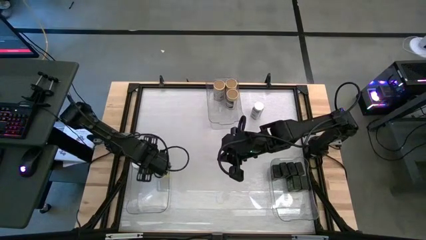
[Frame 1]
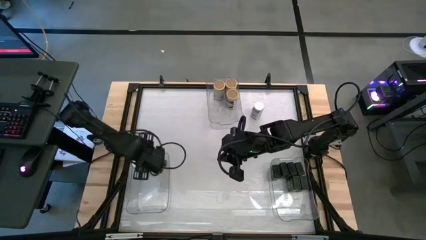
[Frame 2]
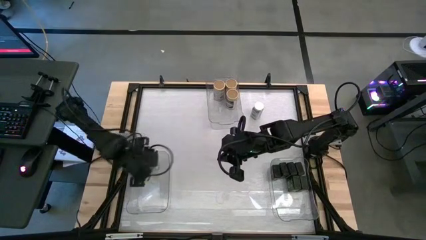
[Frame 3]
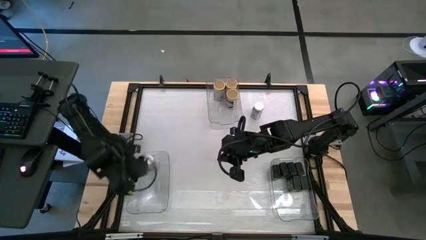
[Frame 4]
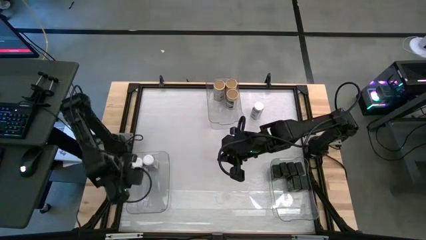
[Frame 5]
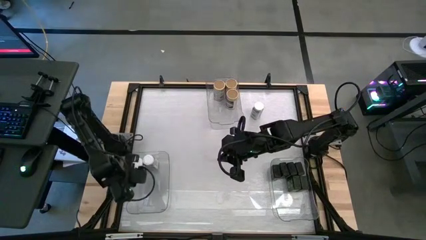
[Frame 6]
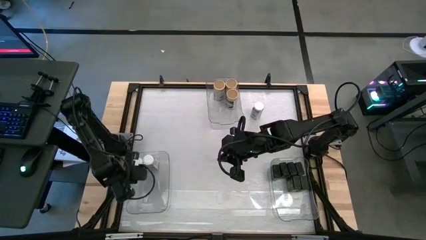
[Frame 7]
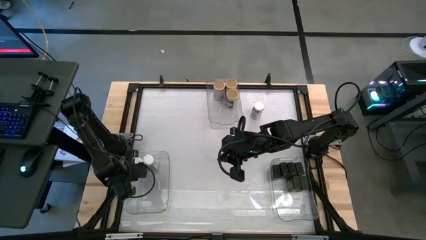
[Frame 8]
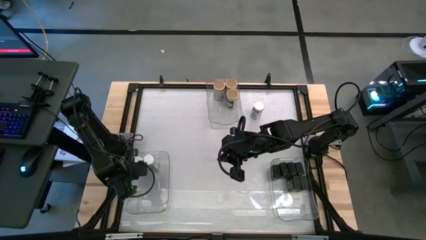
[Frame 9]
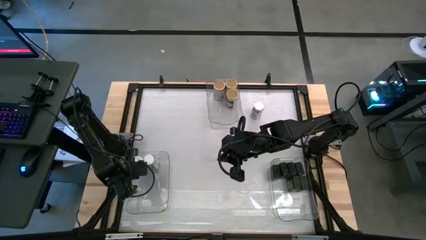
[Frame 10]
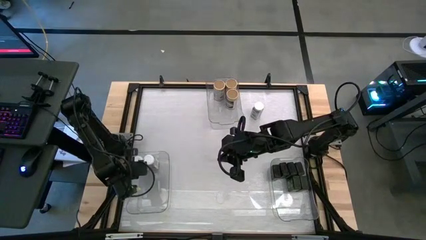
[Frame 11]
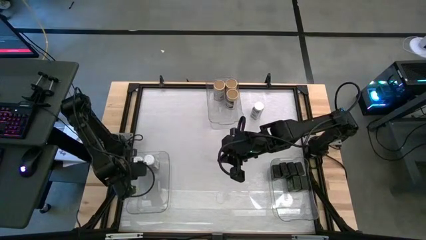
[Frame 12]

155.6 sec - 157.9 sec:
Task: Sort spices by type
Adjust the white spice bottle in the left transparent bin

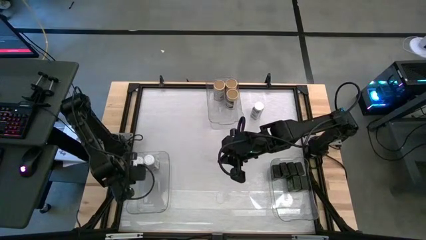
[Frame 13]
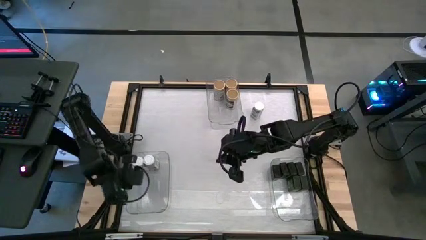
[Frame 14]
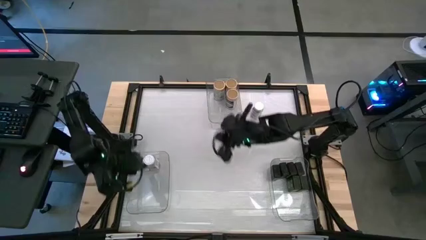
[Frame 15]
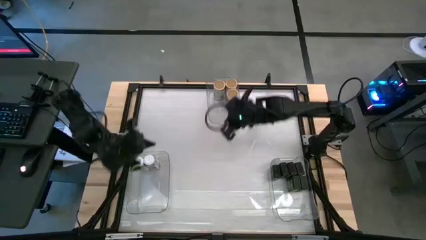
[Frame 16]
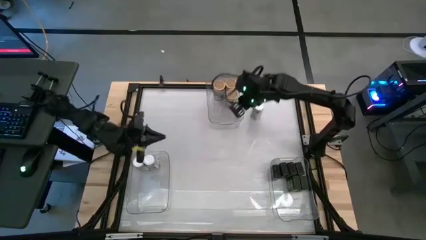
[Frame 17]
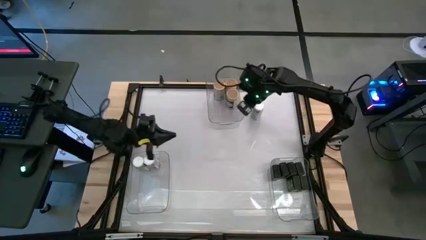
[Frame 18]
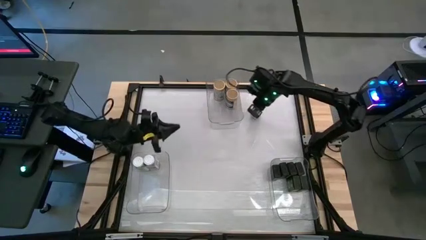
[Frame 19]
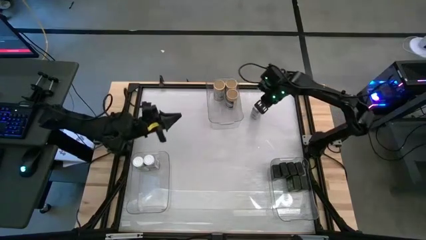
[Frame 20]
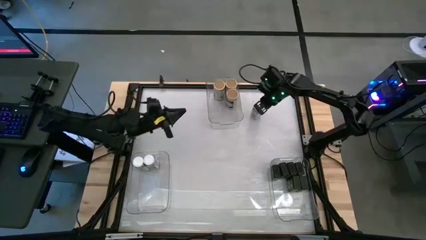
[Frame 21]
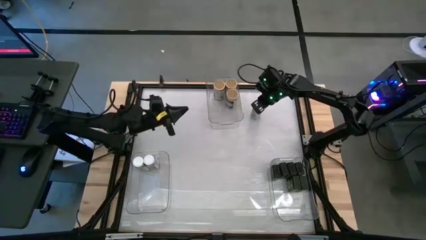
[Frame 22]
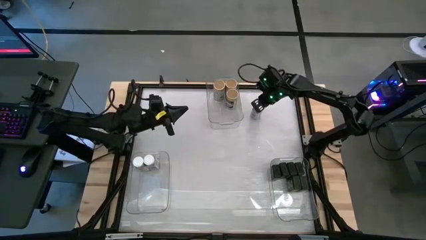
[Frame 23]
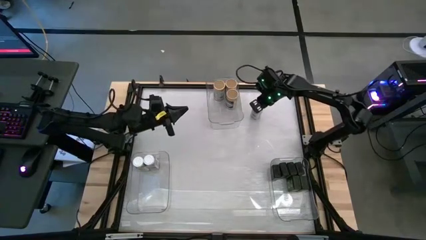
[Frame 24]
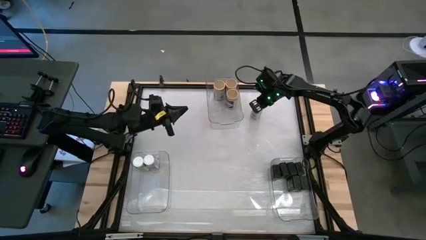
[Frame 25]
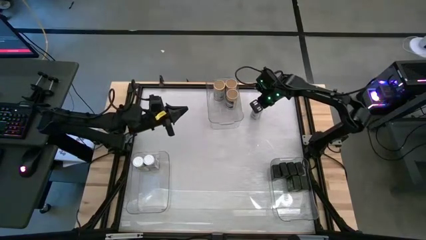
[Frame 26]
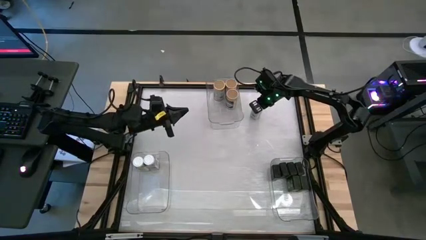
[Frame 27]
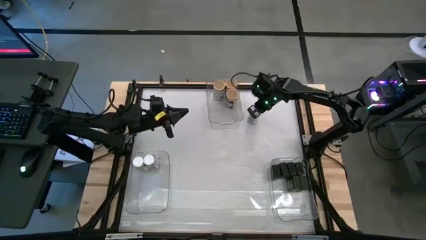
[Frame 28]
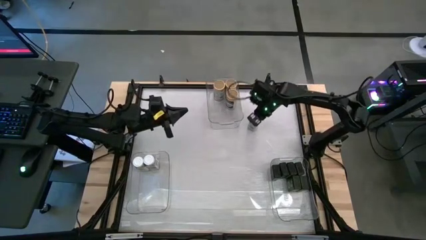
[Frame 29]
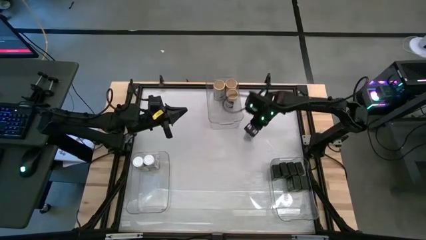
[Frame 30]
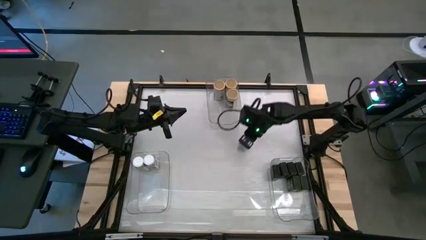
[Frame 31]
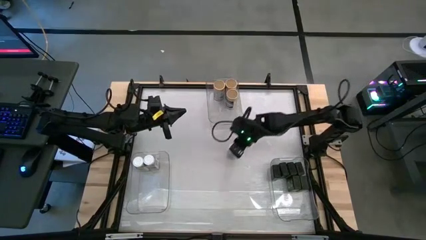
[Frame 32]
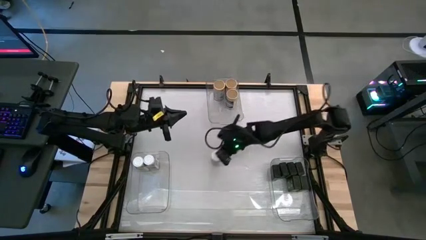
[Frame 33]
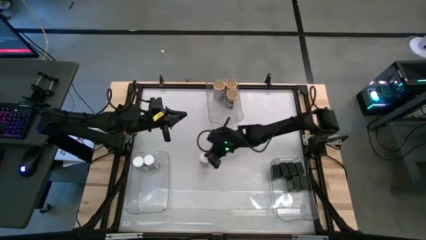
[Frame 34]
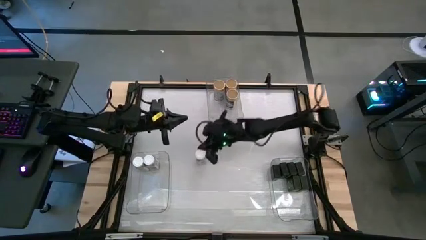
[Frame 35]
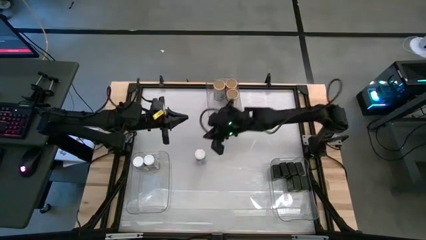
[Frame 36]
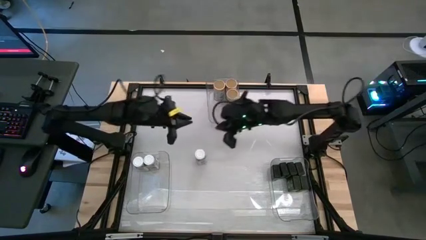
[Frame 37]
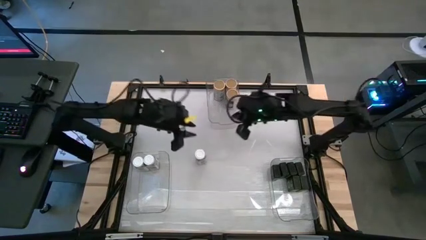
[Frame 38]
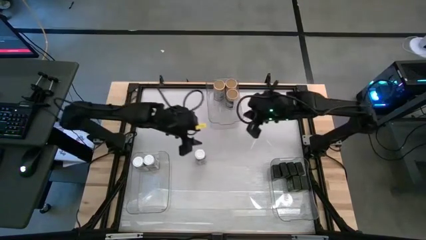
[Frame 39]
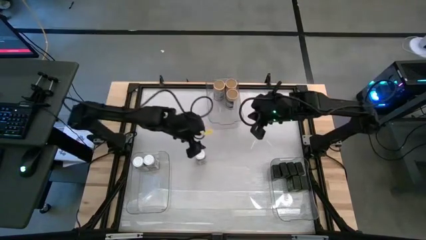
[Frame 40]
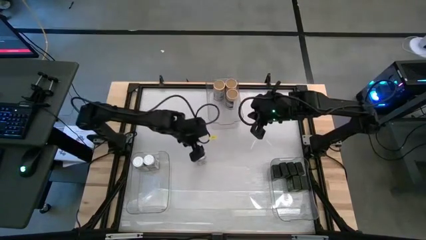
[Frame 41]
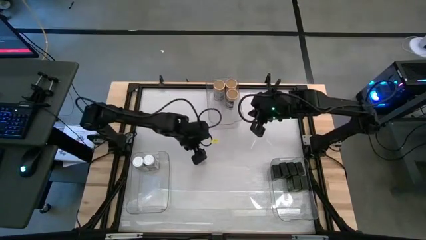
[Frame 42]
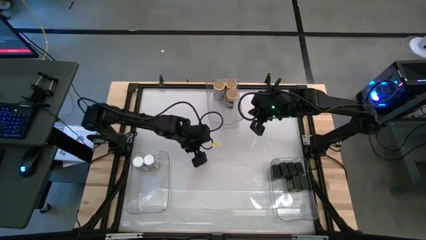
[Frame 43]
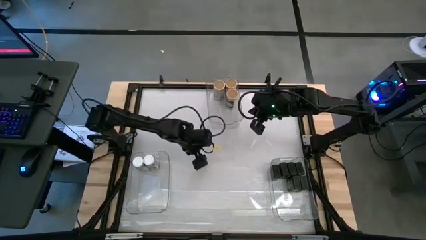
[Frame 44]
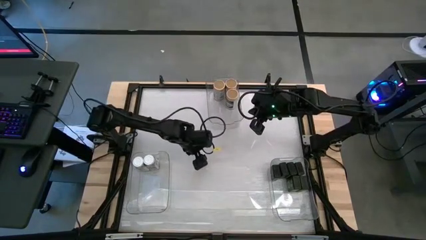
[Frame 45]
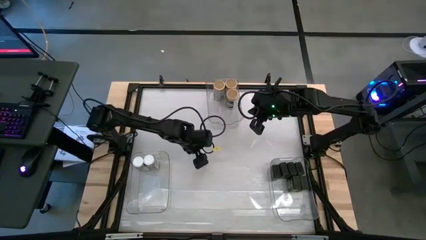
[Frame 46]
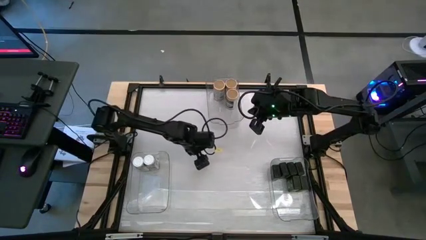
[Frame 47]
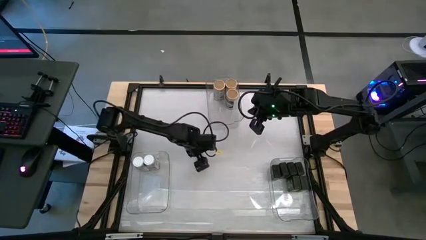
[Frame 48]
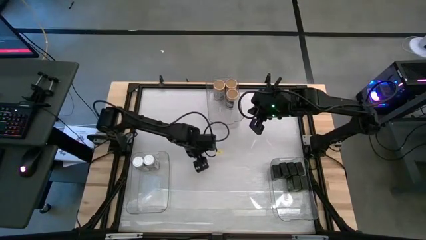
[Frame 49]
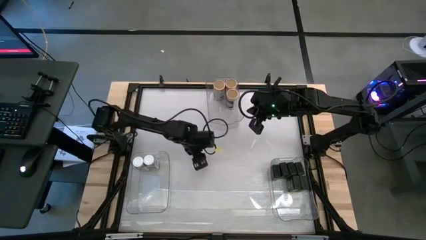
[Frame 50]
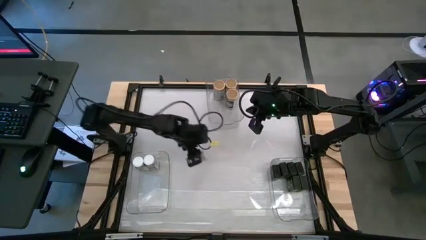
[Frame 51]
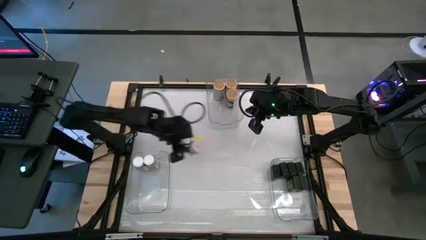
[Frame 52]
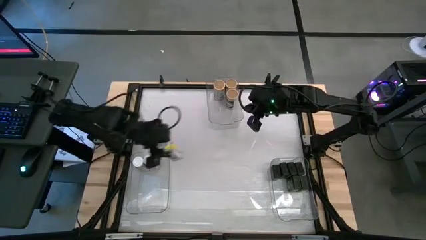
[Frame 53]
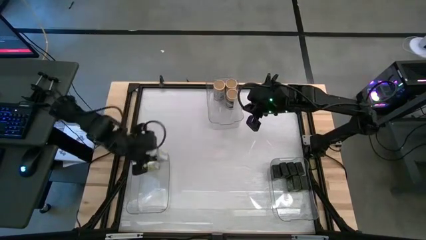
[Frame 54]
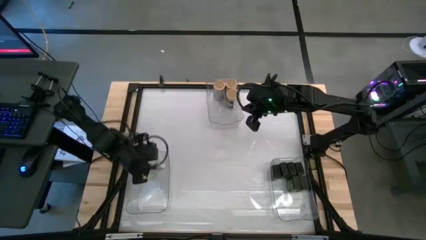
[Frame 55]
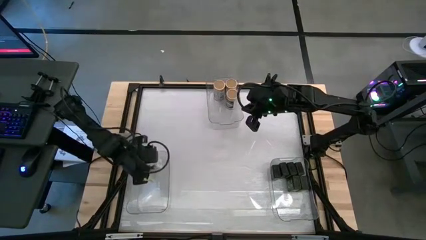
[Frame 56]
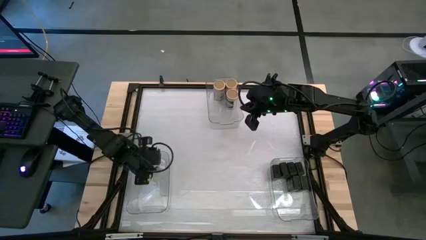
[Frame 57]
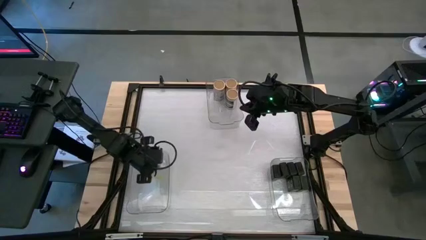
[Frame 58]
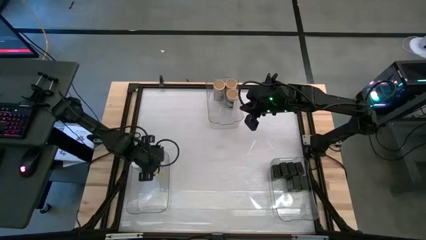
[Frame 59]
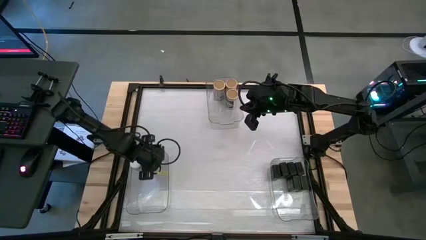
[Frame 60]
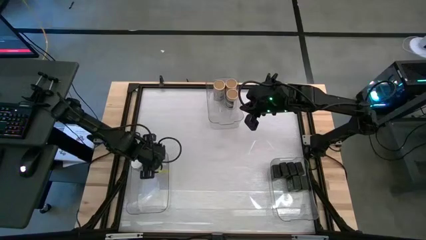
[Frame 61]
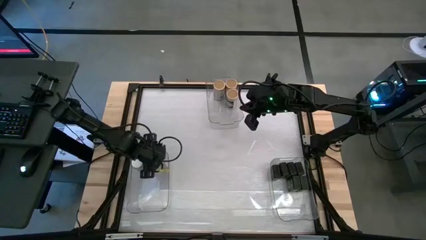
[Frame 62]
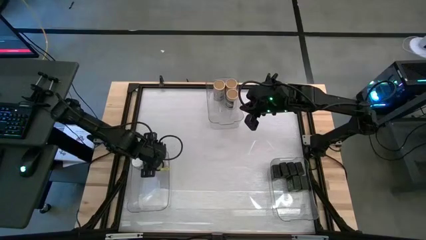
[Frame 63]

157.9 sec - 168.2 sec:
Put the white spice bottle into the left transparent bin

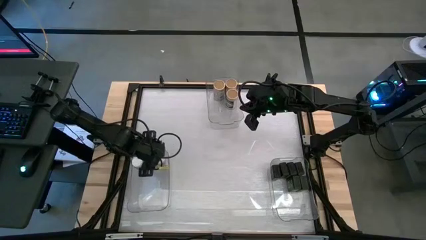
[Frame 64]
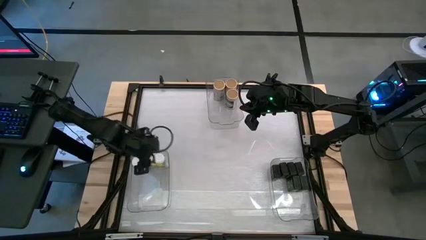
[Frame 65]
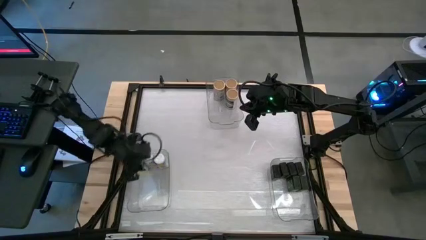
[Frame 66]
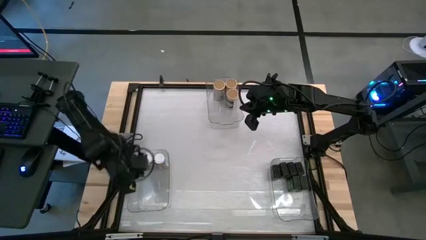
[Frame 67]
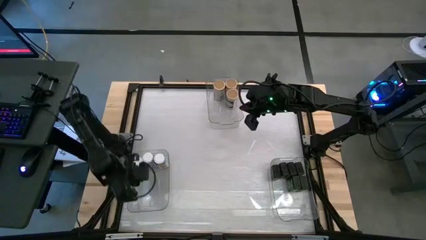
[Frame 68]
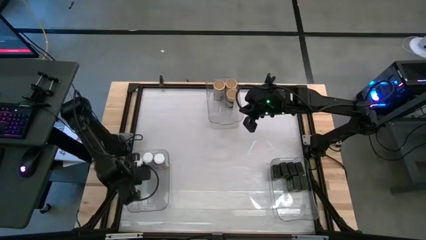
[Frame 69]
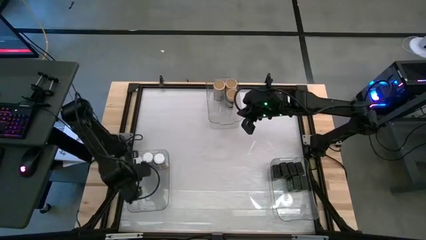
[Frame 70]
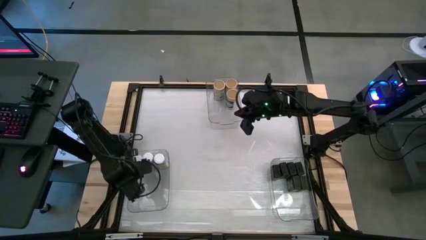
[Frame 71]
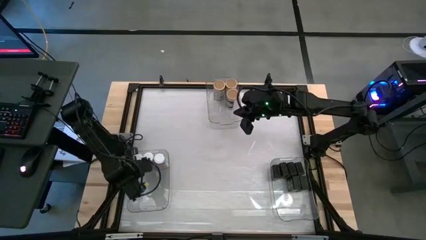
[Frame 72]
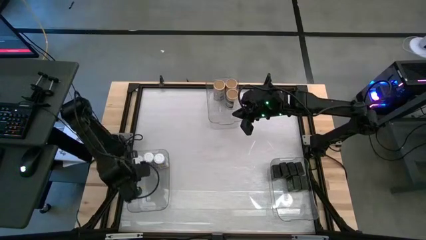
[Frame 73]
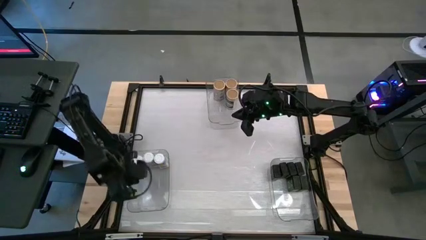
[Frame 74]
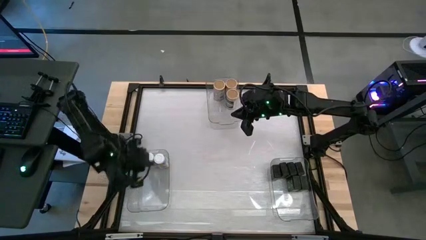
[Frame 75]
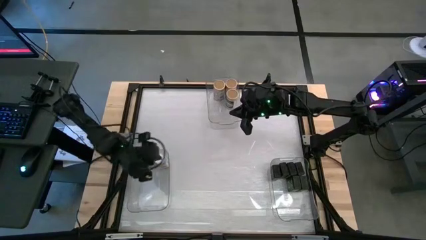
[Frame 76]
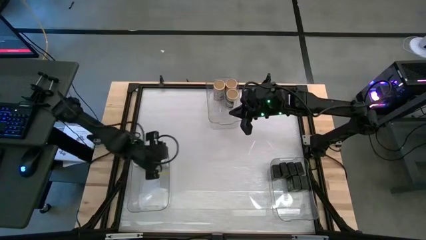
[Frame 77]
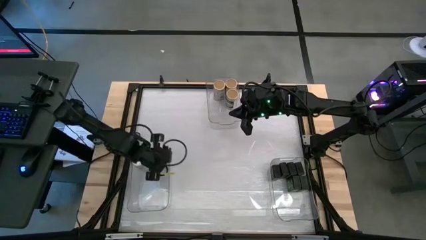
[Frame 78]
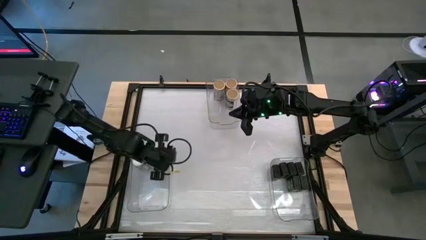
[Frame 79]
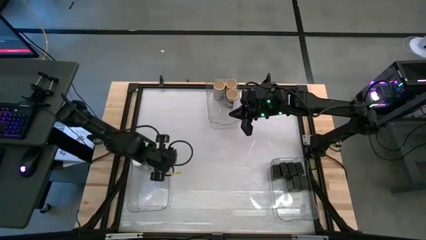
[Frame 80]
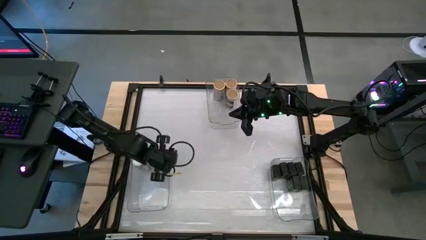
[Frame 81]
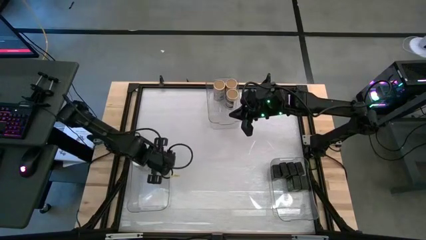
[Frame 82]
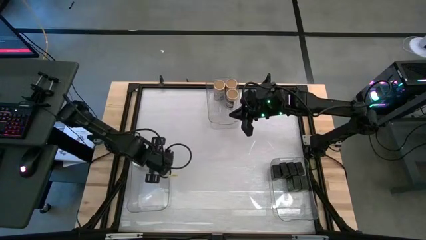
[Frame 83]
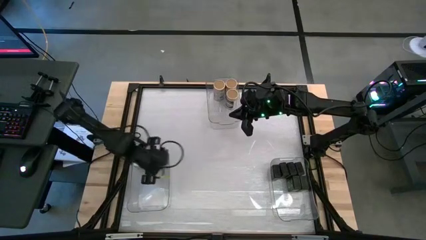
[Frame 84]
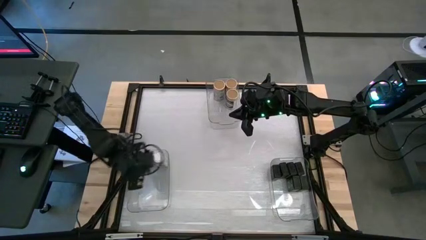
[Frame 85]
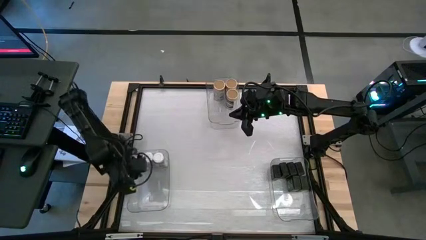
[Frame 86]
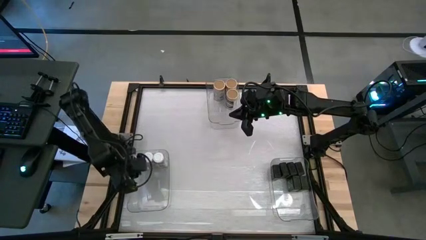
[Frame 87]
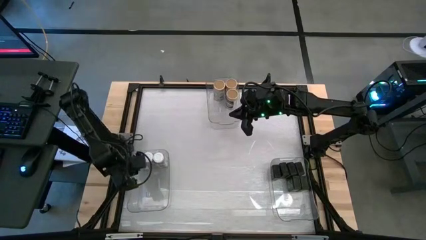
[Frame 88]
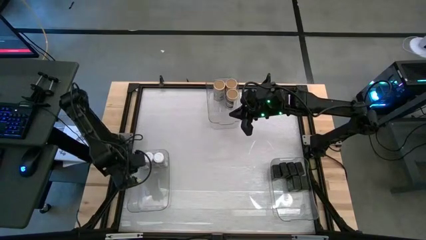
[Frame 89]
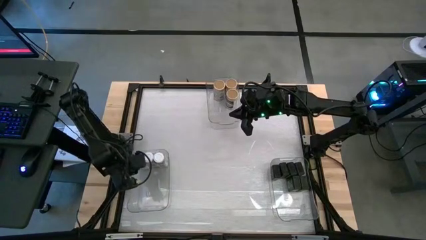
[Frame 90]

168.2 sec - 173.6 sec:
Adjust the white spice bottles in the left transparent bin
